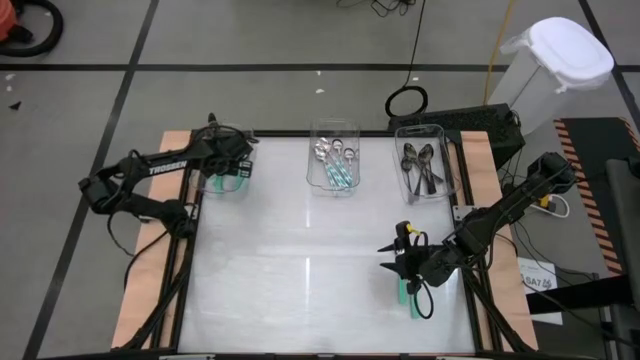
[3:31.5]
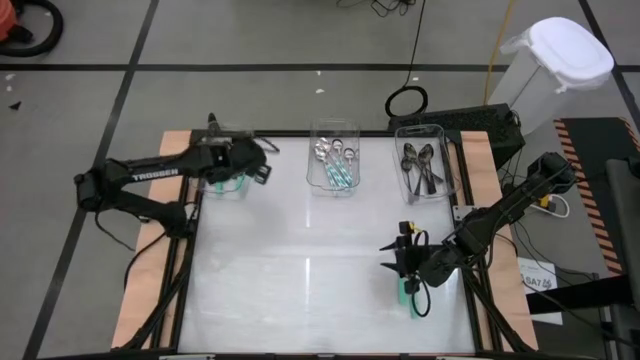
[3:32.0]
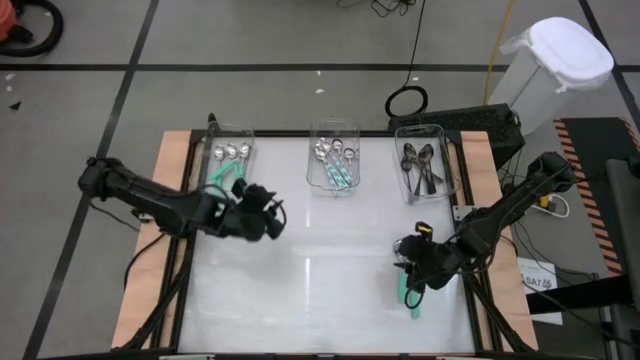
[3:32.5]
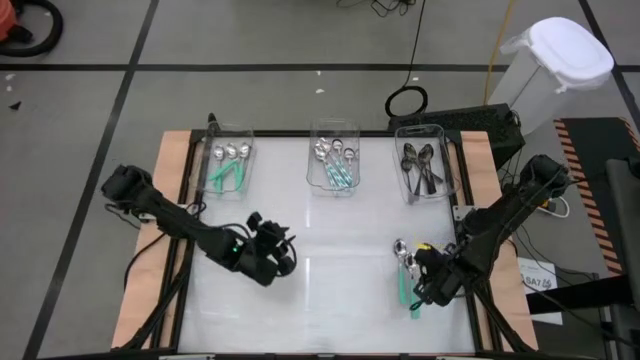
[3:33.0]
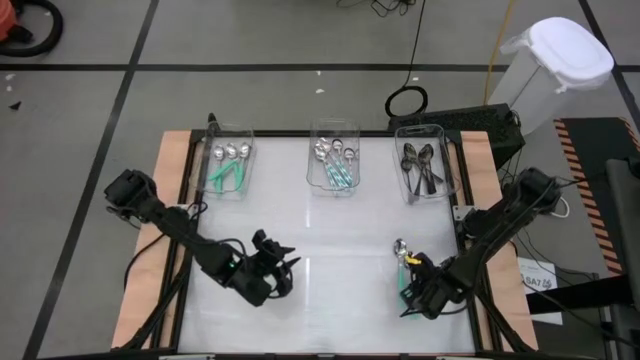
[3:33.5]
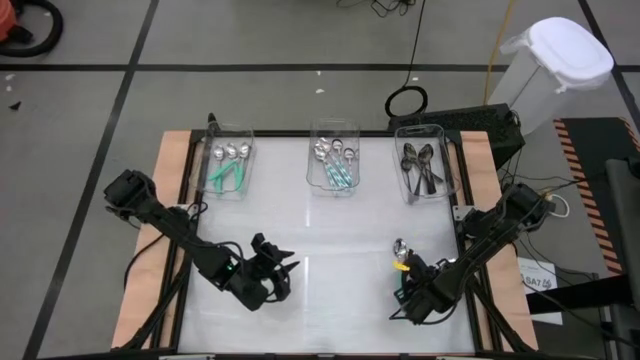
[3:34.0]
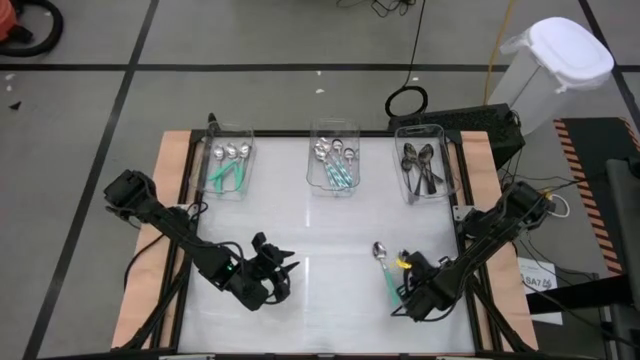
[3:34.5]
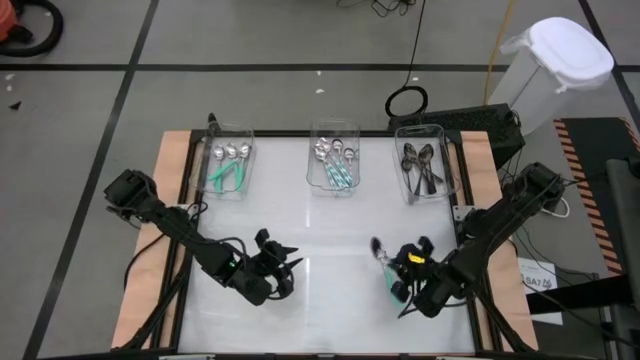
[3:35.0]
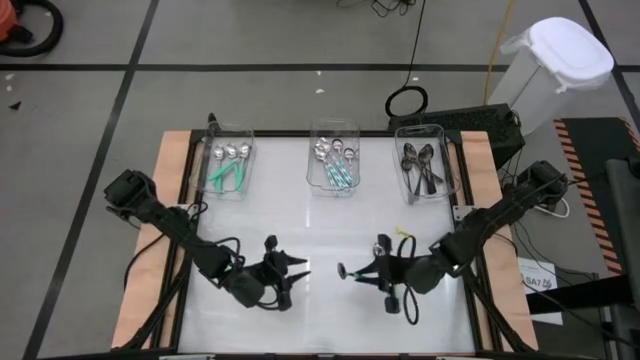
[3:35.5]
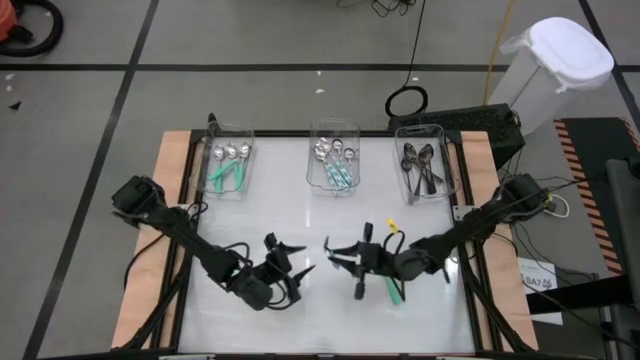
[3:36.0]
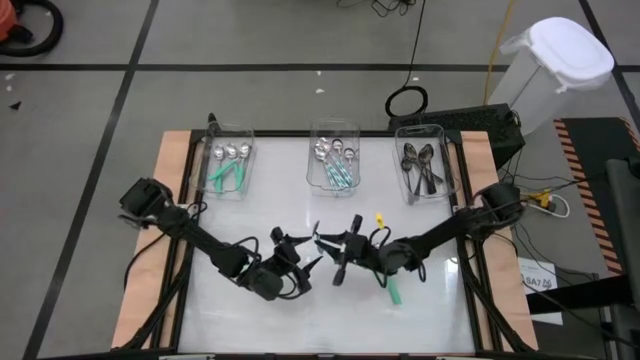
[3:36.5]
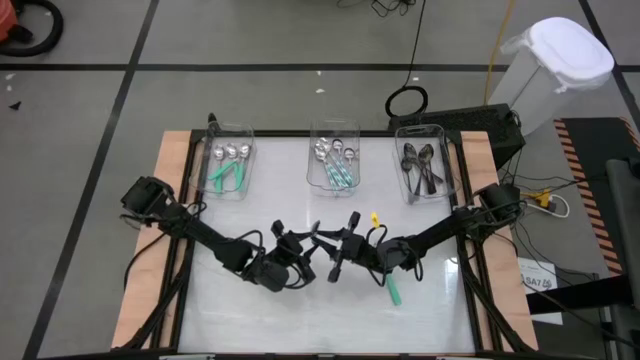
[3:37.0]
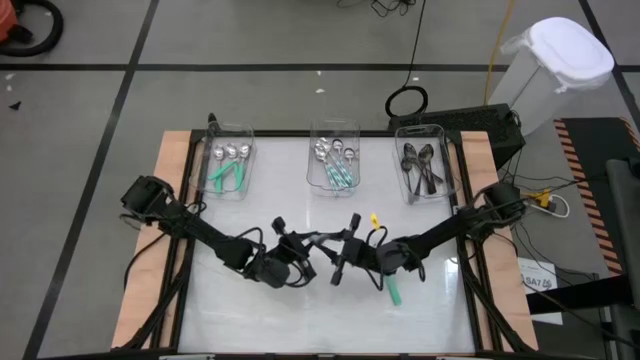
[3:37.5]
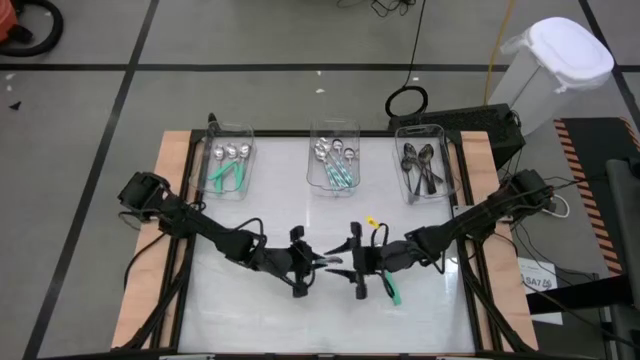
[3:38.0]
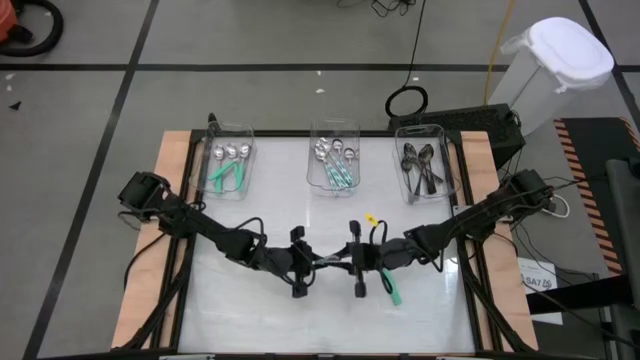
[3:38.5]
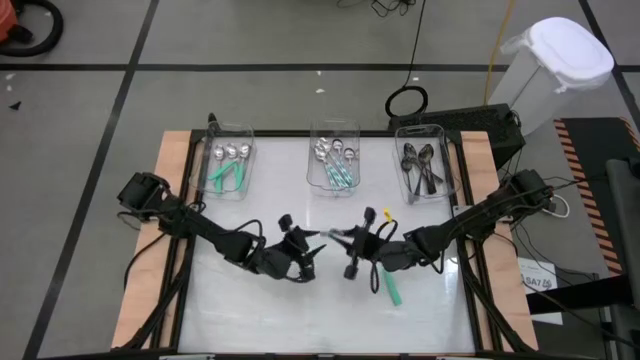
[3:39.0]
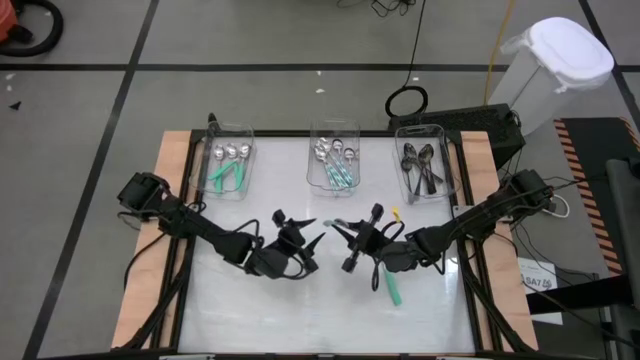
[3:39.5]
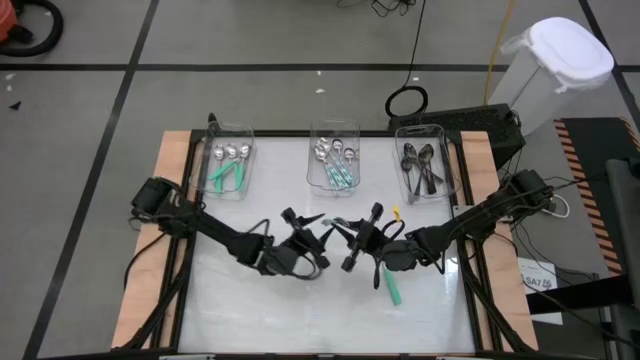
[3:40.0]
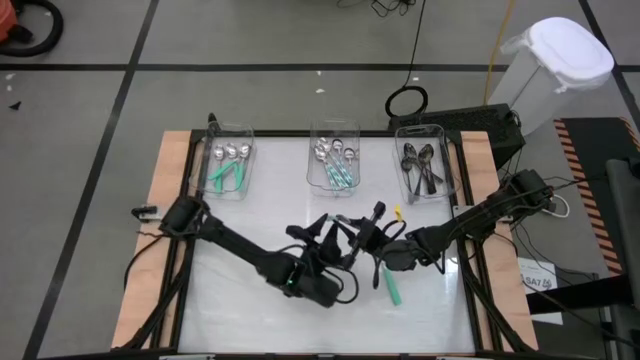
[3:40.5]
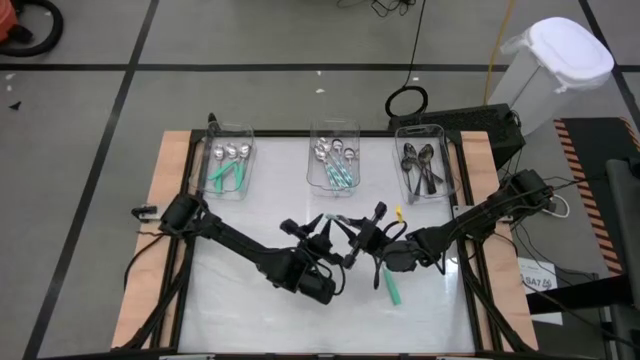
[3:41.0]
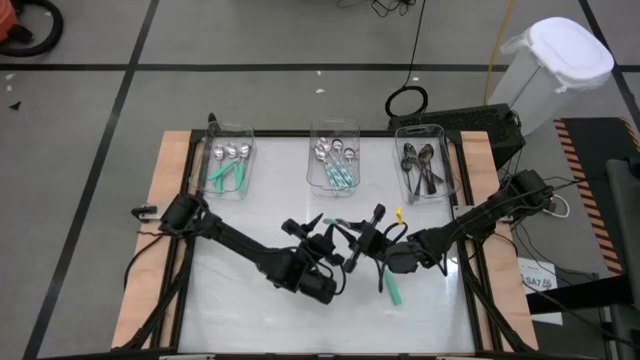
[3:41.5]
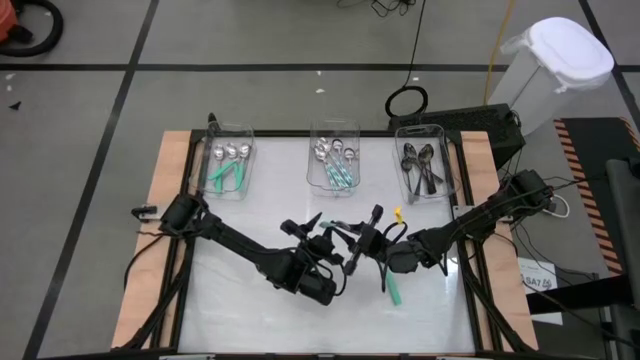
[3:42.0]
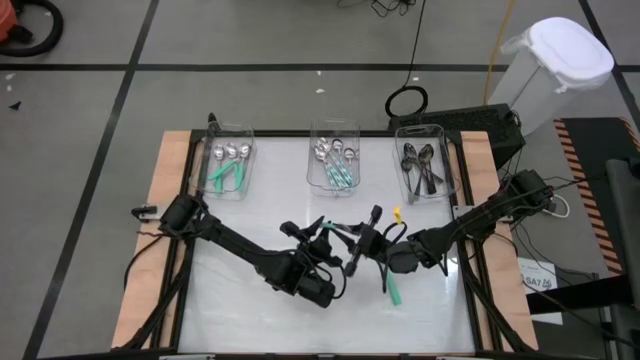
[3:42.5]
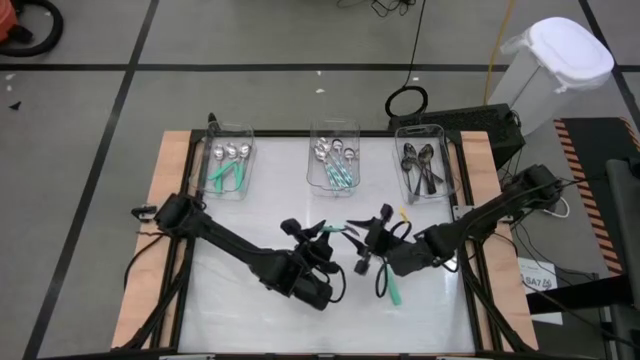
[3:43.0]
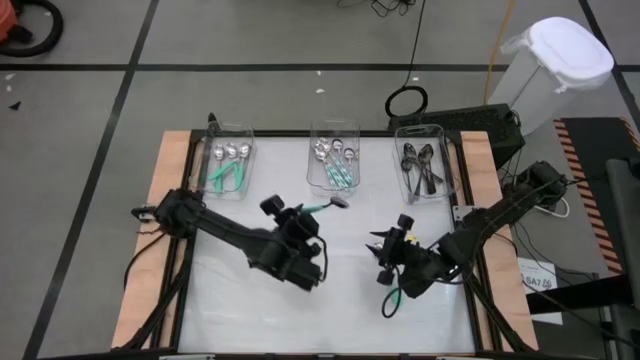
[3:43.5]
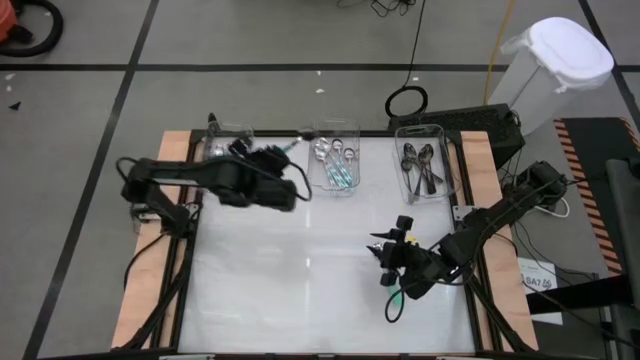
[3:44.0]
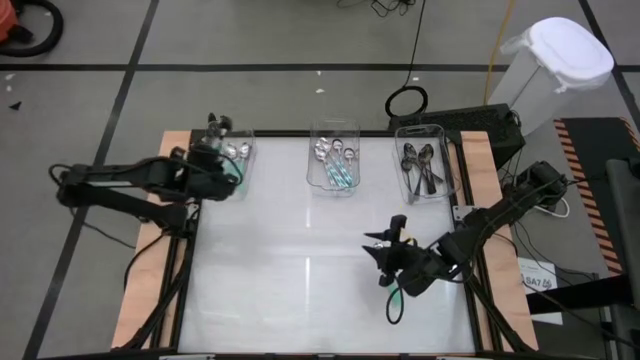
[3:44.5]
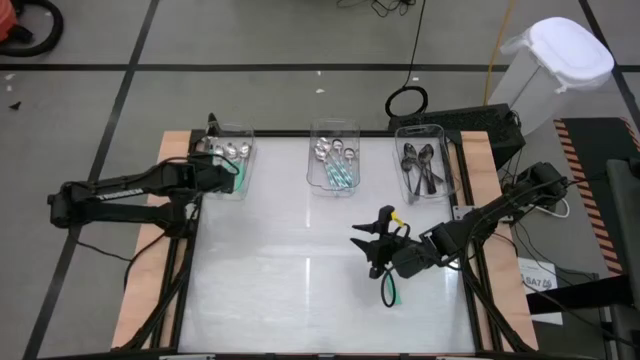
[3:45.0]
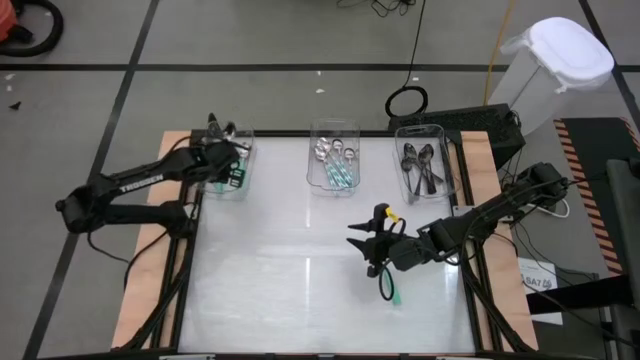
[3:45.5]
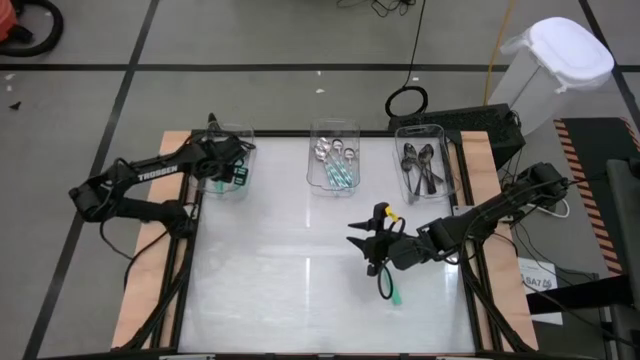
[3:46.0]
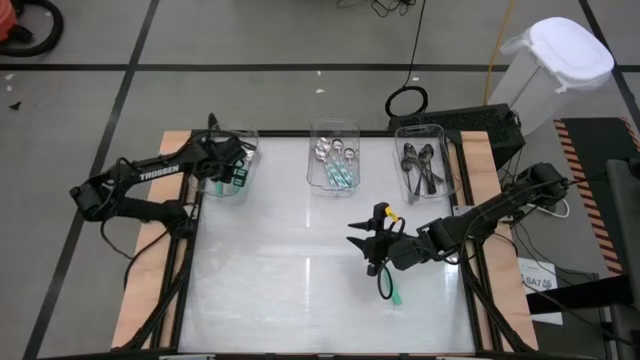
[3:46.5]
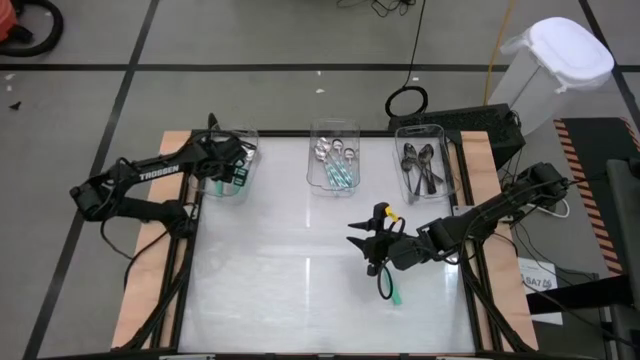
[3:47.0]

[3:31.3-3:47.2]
Task: Sort silverware by color (type)
Put the green spoon into the left transparent bin

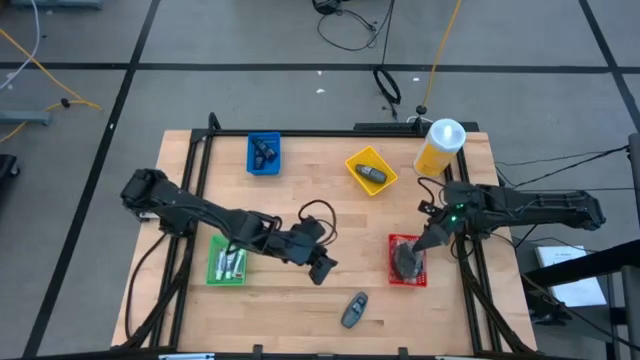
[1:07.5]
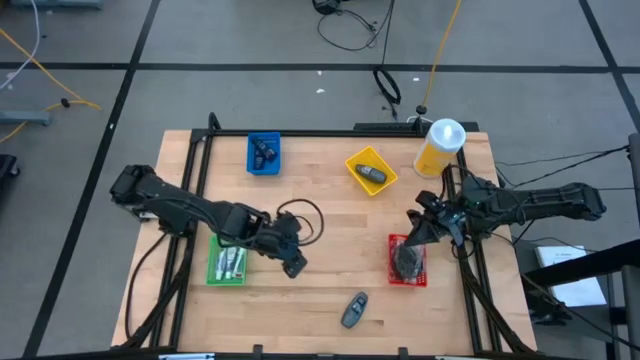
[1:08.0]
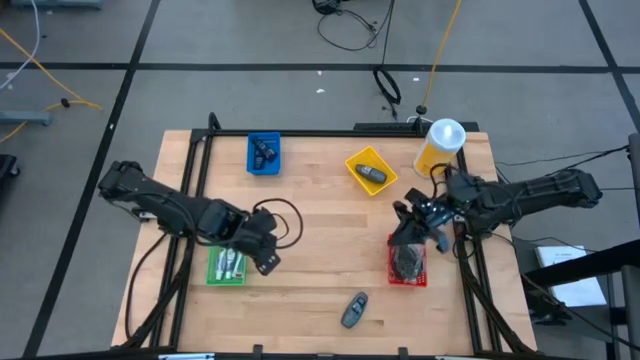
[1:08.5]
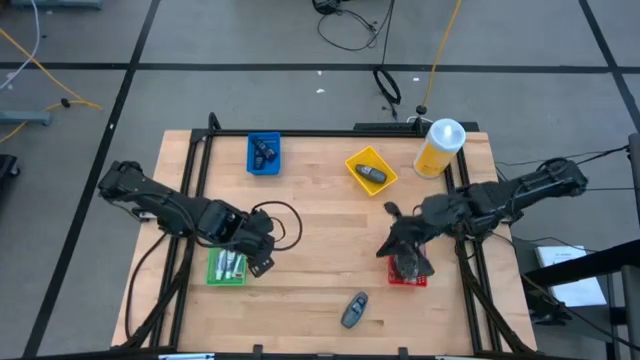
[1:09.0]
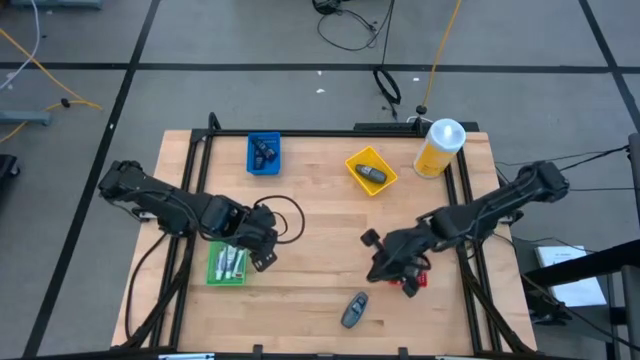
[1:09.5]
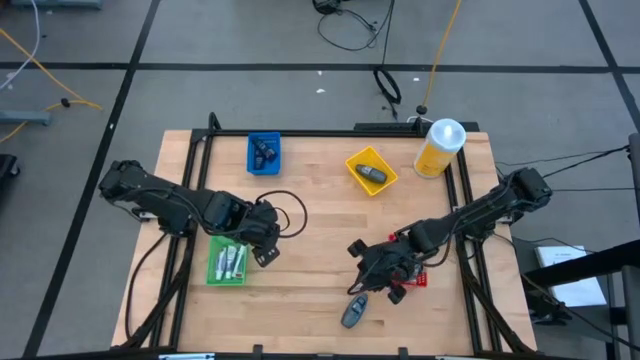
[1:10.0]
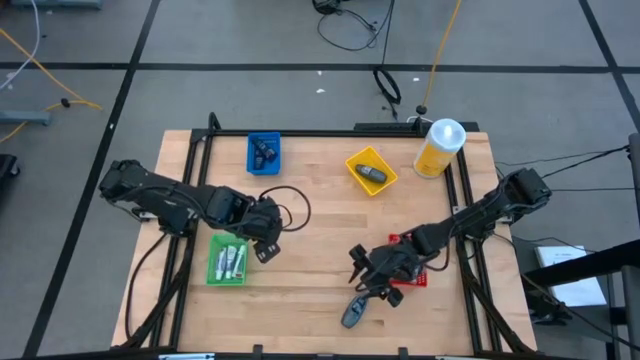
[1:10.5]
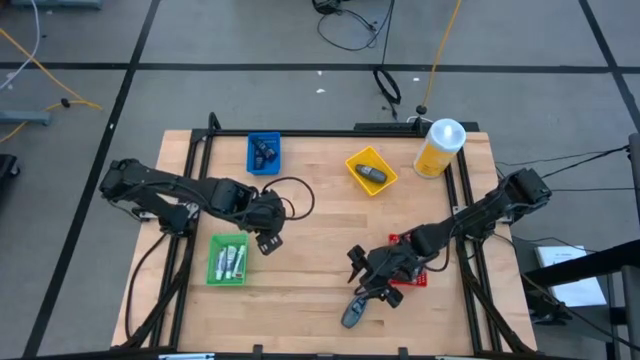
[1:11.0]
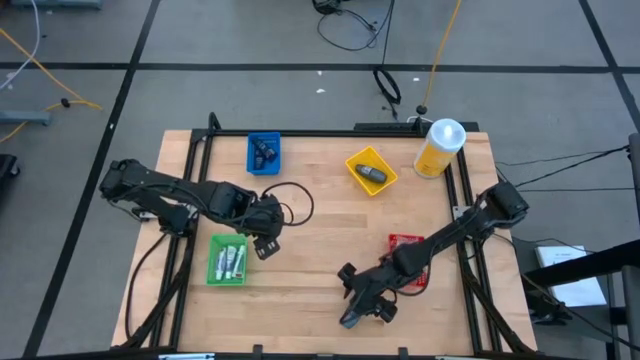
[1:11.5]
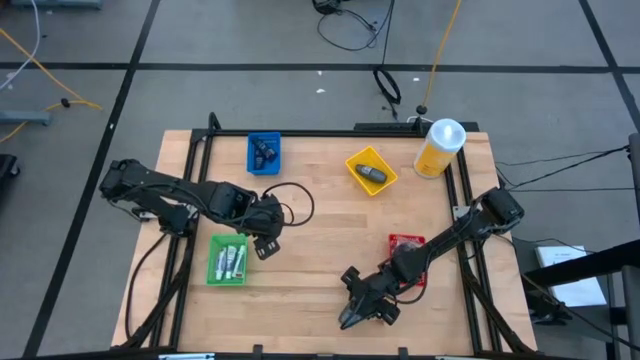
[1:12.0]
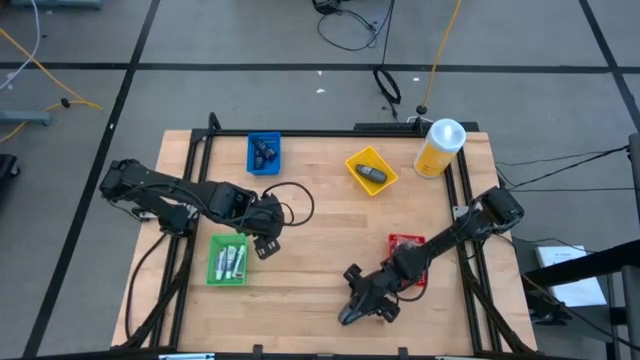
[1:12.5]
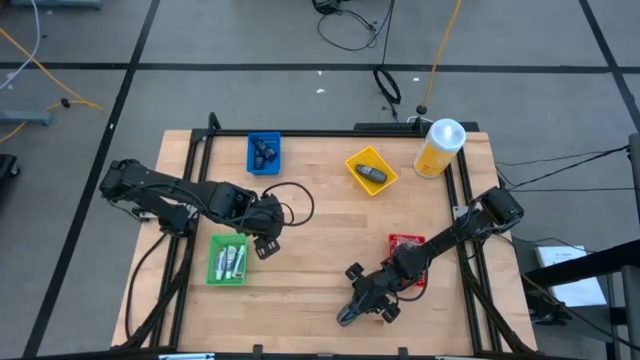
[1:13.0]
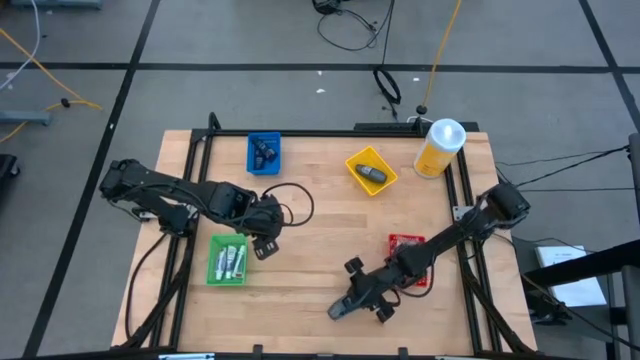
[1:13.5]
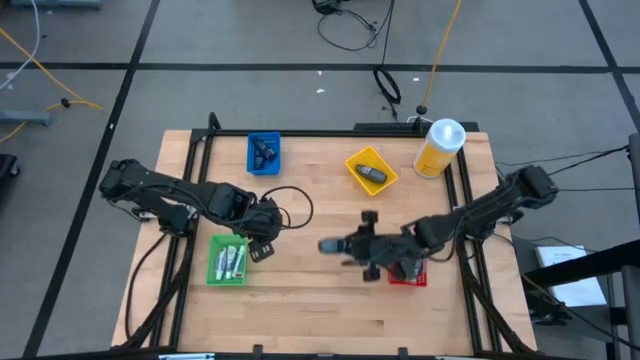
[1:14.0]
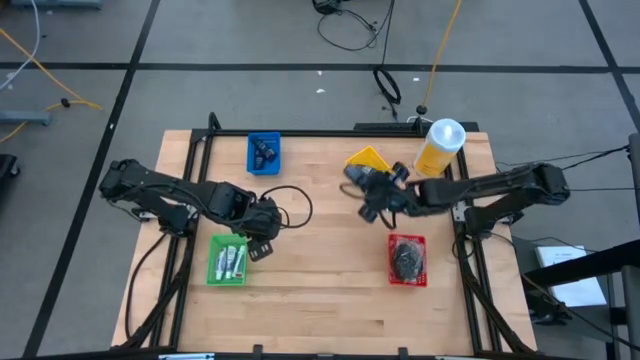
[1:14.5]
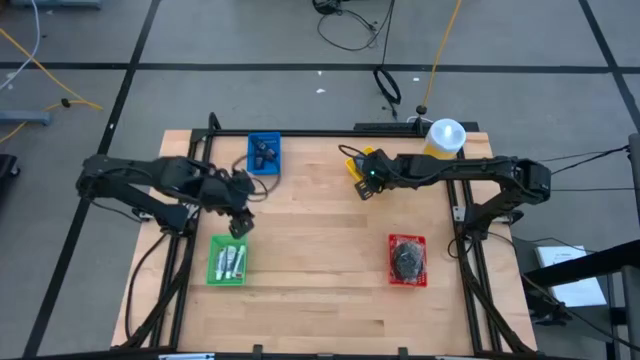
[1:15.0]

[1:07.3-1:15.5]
Task: Pick & Place Travel size toiletries
Put the gray deodorant into the yellow bin
